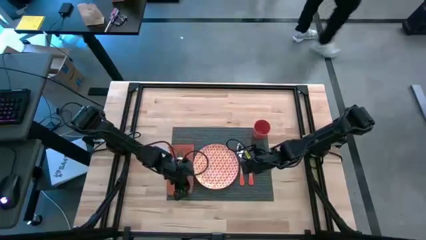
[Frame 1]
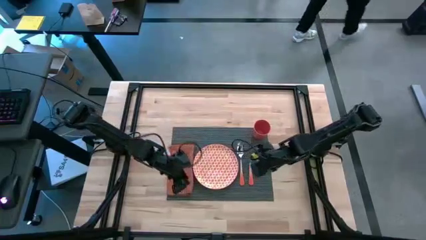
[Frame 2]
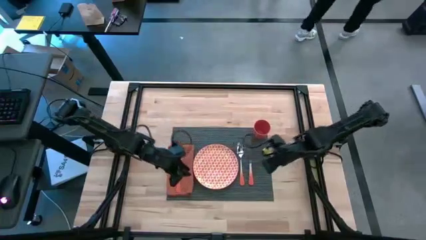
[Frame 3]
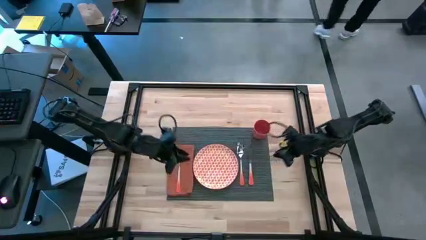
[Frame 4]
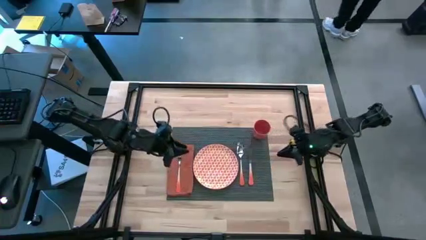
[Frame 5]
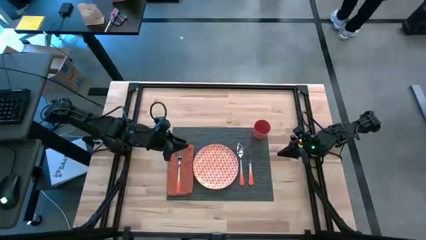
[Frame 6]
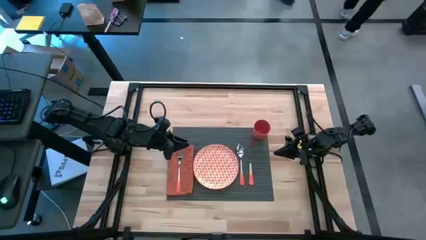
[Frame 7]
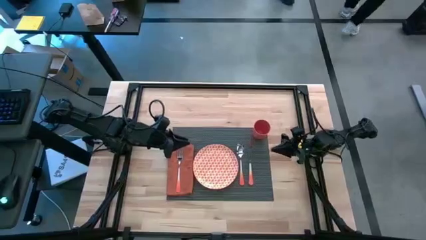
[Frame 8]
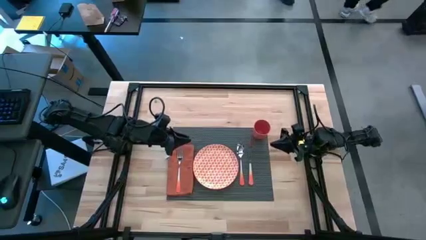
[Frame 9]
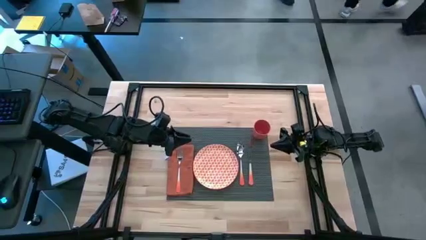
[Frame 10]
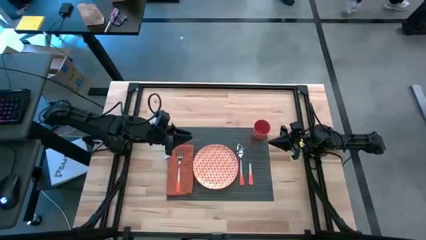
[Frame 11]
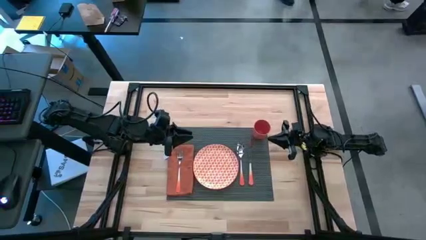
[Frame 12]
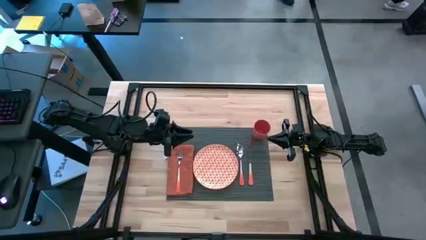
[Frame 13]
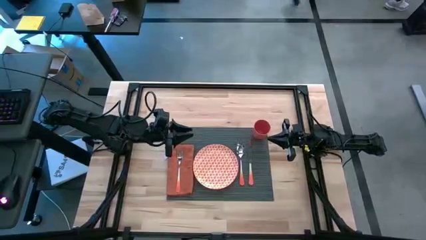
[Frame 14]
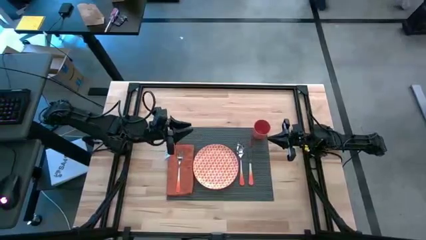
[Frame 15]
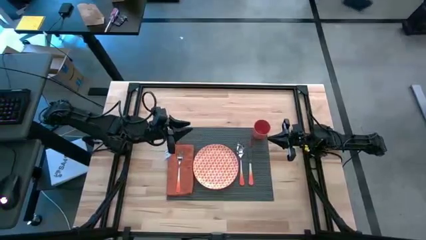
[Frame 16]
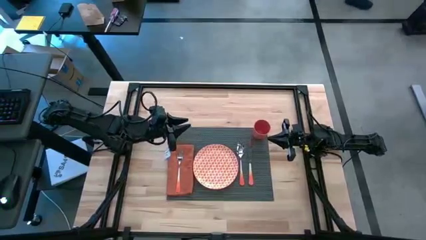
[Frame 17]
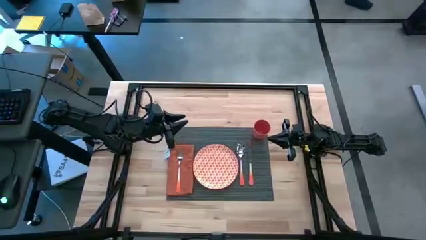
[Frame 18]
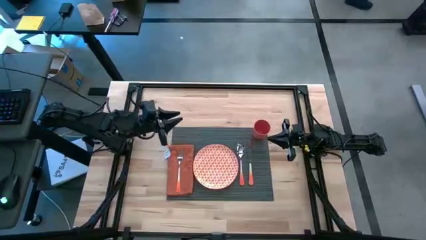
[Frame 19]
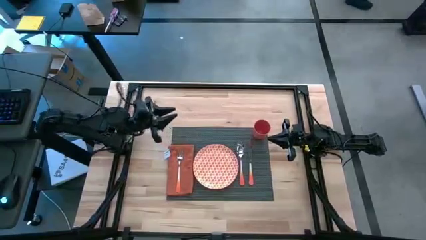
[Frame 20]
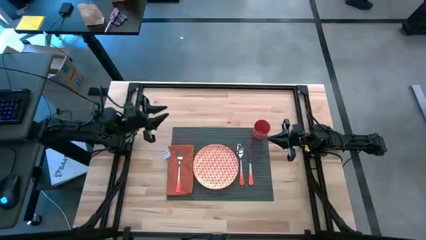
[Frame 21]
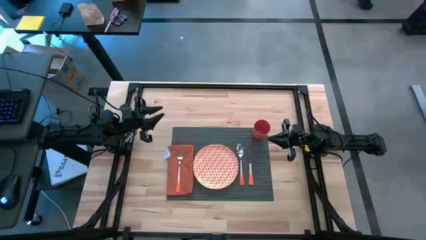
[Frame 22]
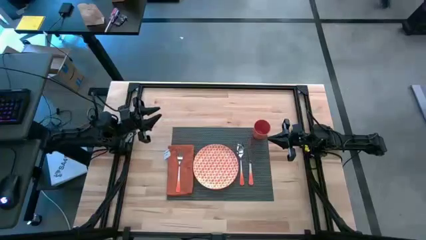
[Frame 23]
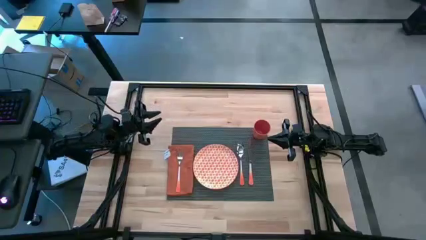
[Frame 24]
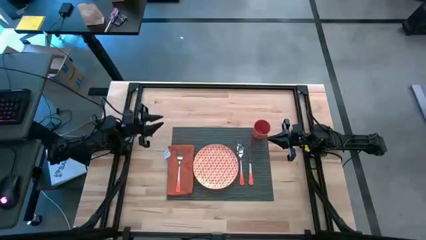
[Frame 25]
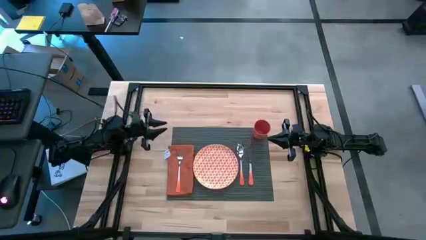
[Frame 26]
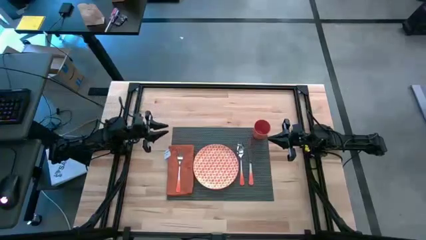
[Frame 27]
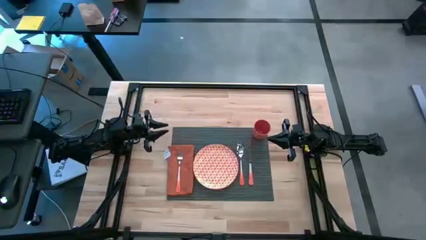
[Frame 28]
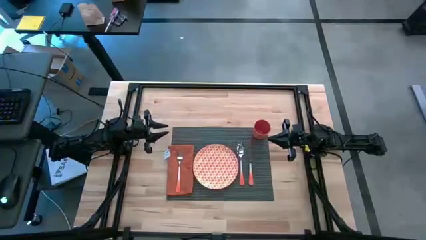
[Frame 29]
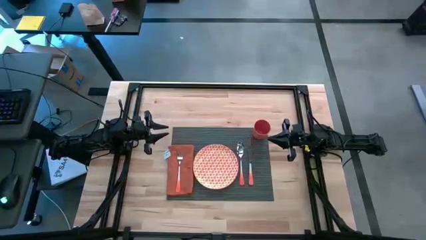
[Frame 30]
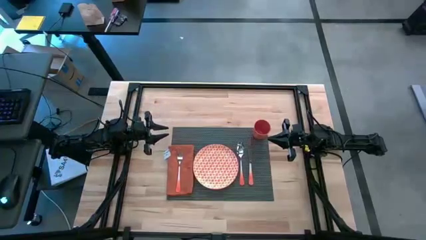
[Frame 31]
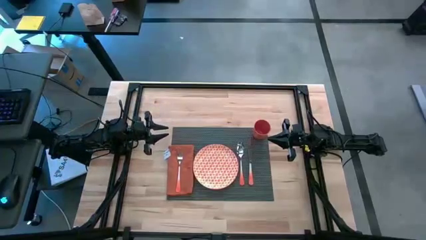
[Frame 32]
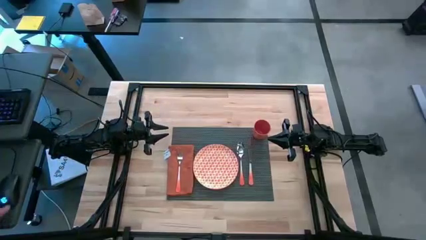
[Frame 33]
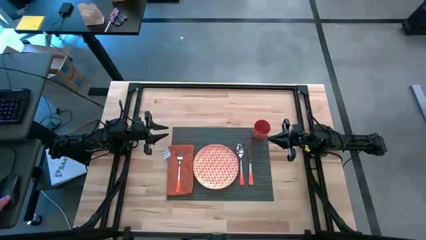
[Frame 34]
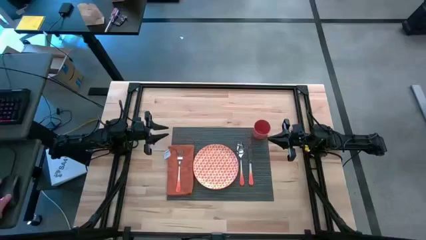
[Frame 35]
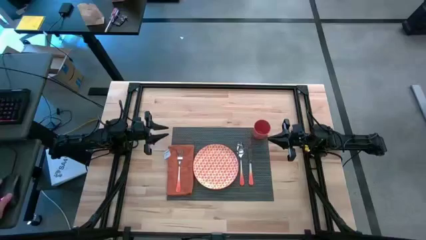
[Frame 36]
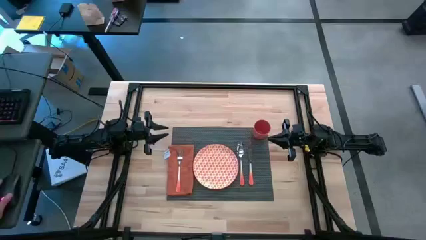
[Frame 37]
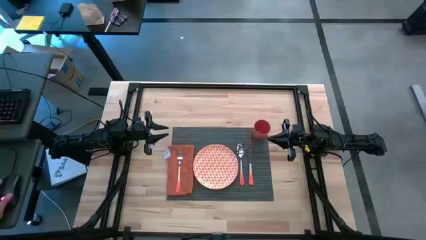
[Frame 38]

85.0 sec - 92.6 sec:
Task: Set table place
Return to Home Position
